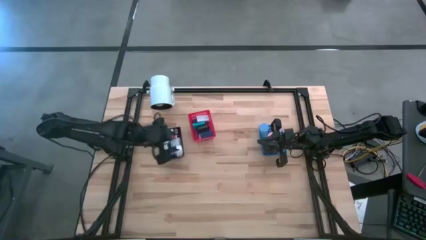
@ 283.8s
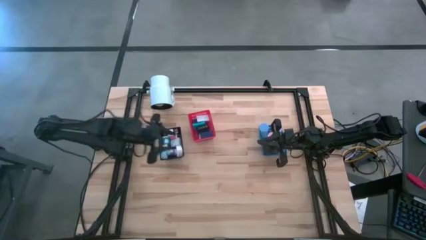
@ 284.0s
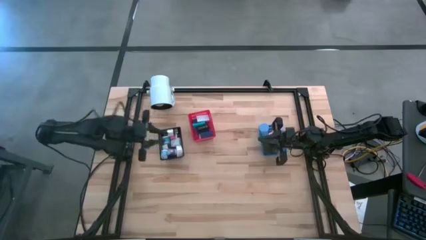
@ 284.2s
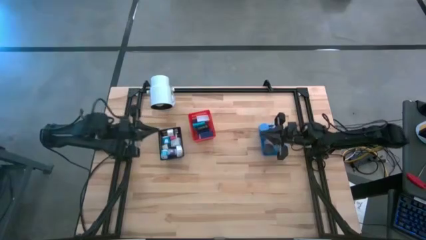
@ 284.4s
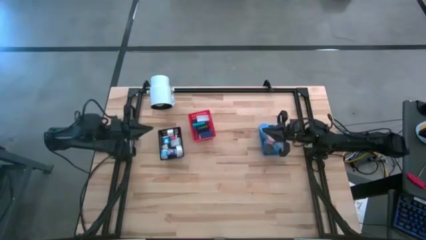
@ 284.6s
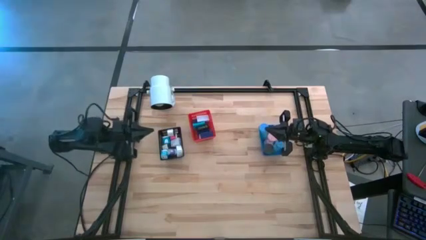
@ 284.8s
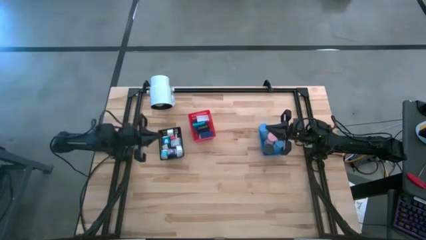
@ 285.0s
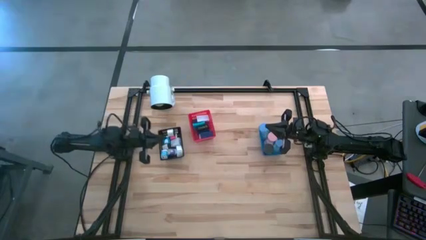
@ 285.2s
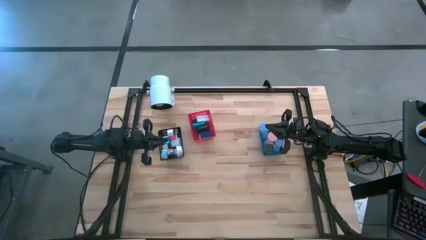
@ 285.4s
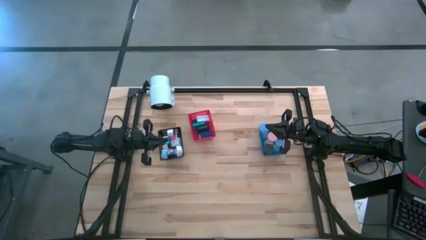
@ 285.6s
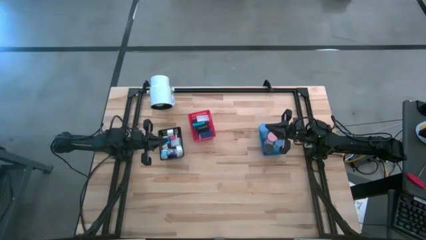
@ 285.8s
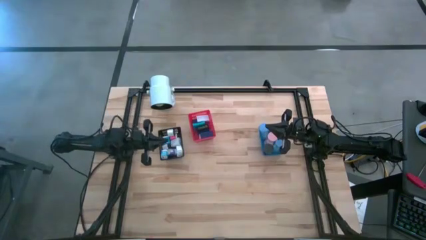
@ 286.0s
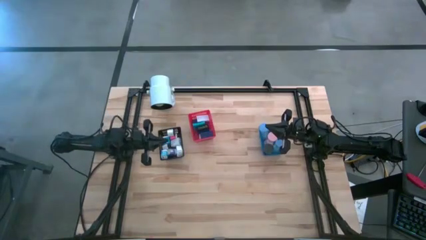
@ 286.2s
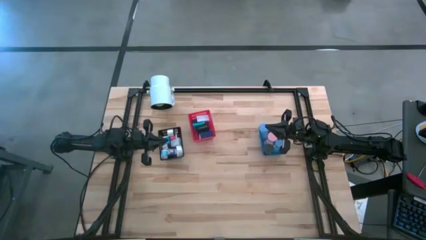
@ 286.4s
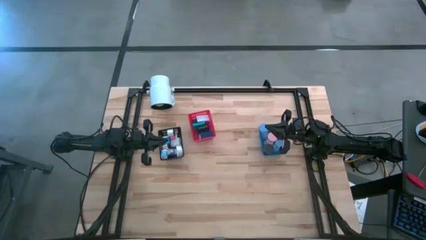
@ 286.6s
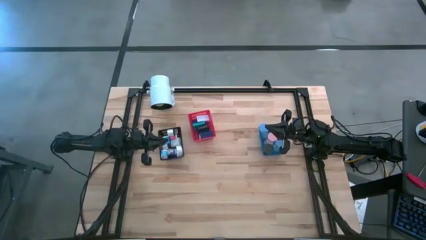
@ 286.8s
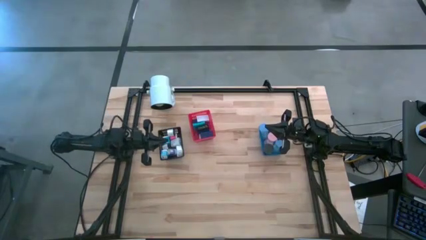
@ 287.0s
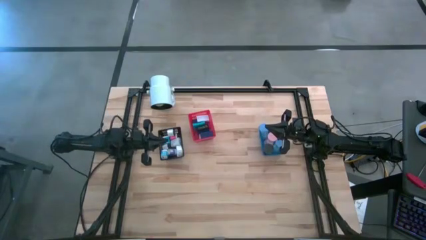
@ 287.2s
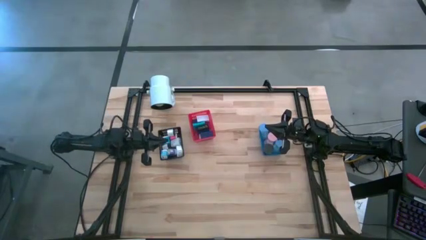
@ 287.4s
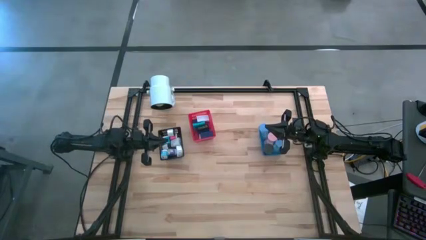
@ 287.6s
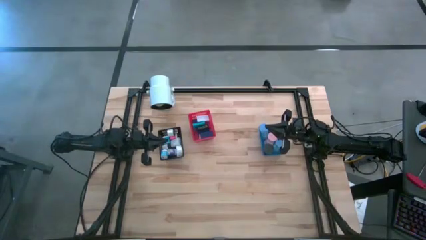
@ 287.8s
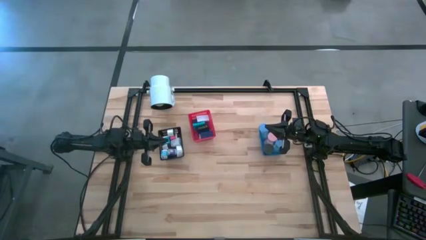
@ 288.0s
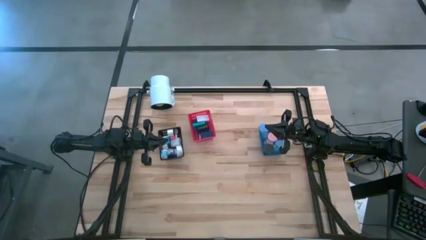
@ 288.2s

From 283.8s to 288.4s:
Task: Pick & Place Office items
Return to Home Position

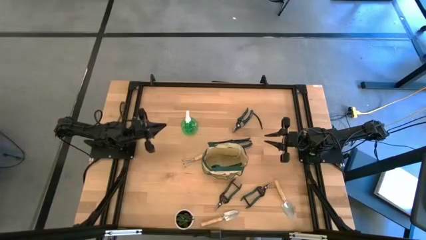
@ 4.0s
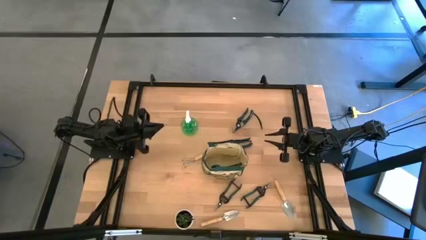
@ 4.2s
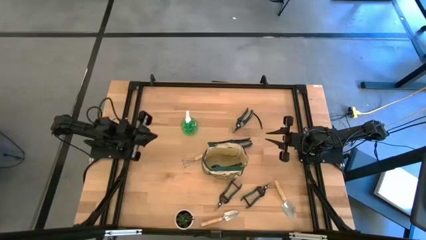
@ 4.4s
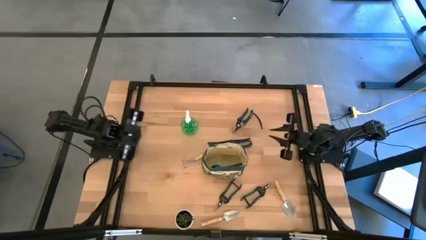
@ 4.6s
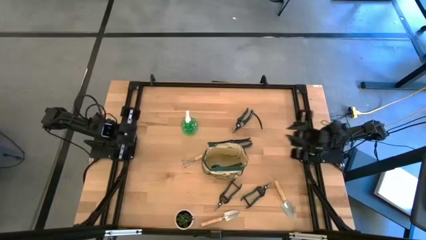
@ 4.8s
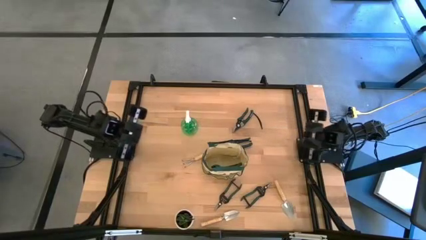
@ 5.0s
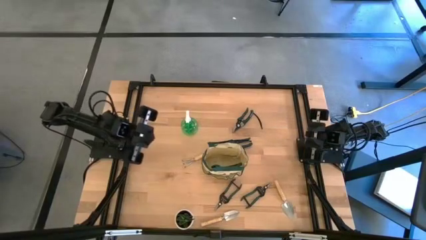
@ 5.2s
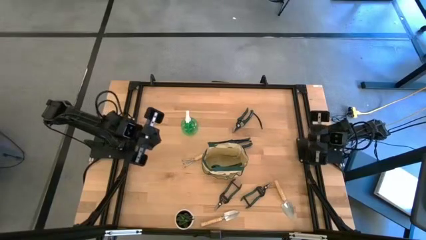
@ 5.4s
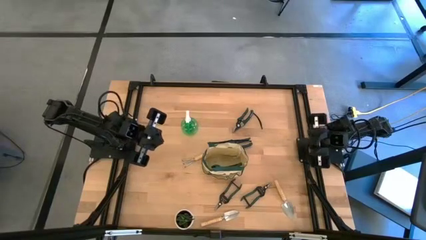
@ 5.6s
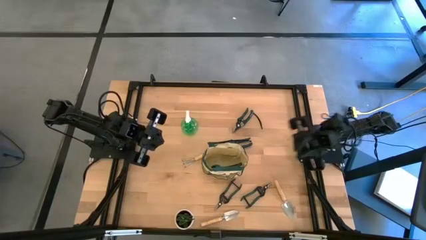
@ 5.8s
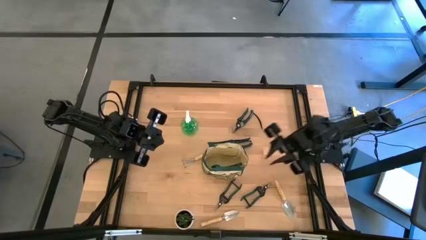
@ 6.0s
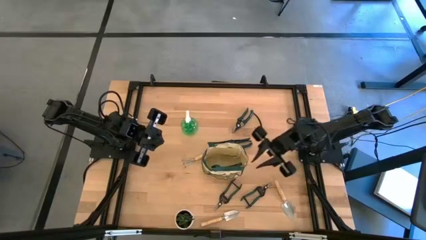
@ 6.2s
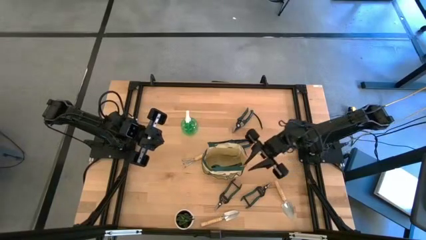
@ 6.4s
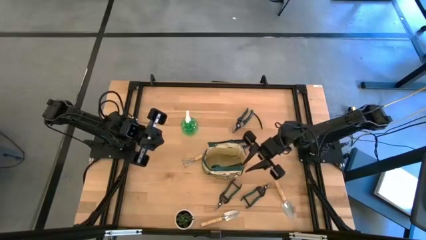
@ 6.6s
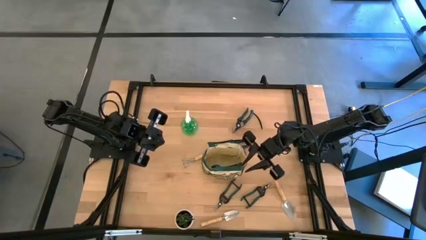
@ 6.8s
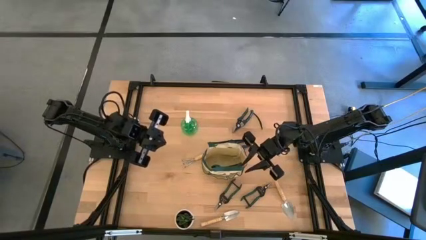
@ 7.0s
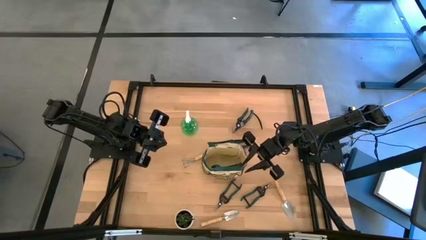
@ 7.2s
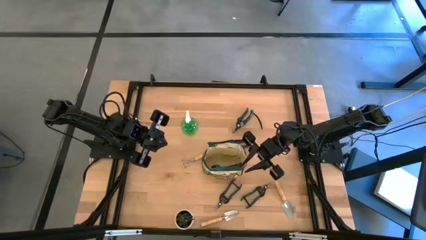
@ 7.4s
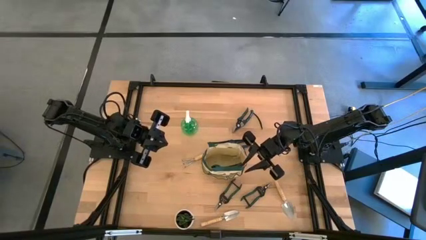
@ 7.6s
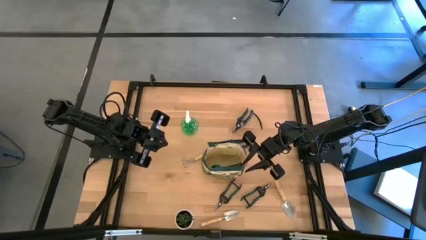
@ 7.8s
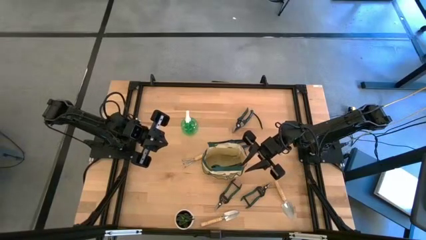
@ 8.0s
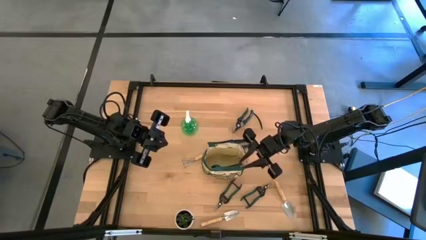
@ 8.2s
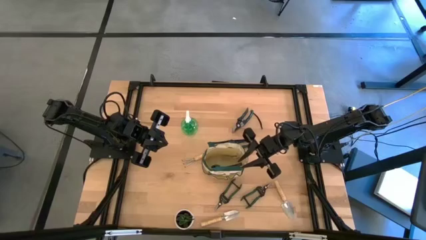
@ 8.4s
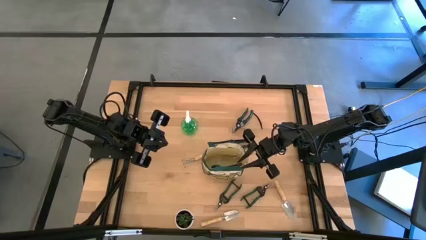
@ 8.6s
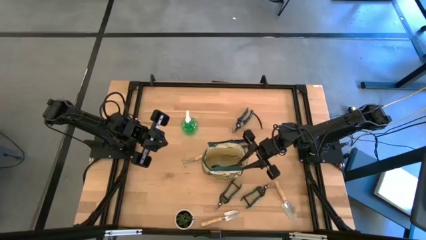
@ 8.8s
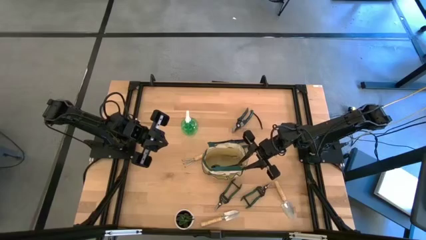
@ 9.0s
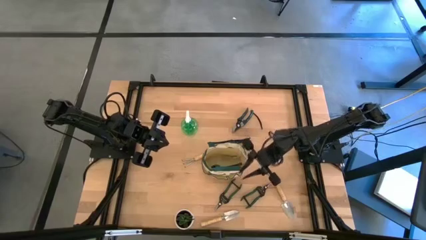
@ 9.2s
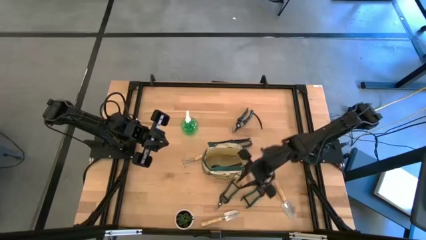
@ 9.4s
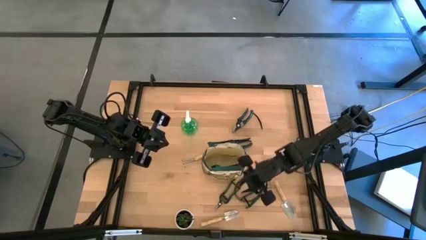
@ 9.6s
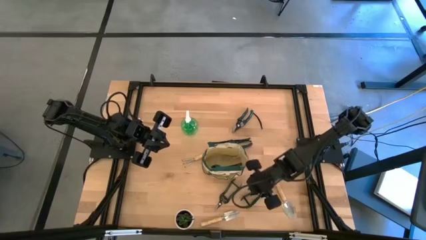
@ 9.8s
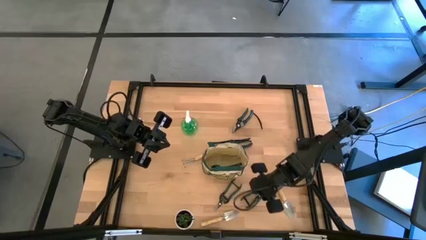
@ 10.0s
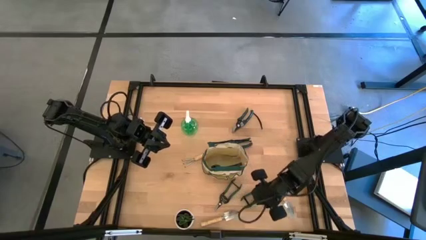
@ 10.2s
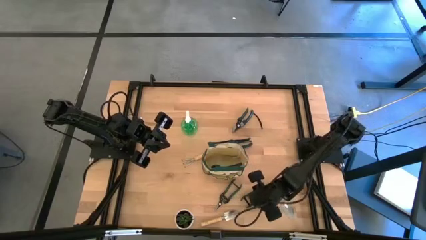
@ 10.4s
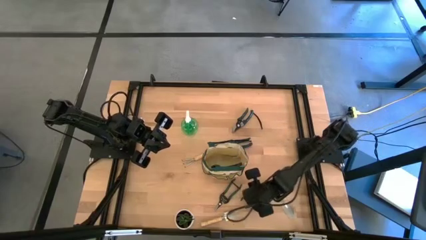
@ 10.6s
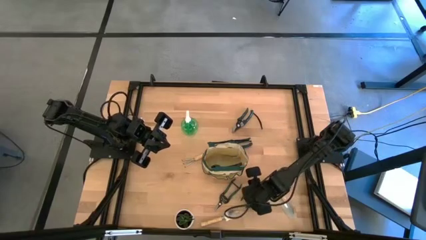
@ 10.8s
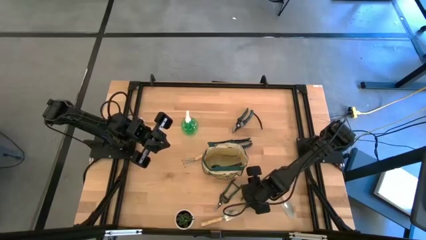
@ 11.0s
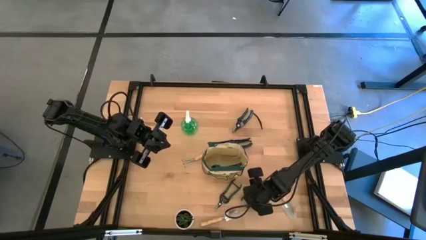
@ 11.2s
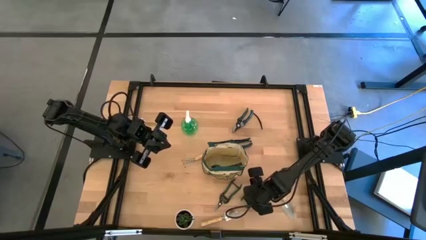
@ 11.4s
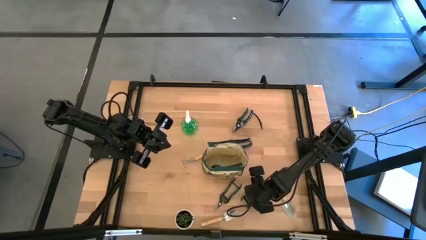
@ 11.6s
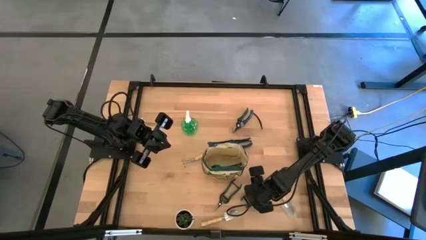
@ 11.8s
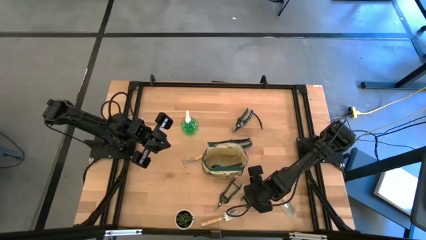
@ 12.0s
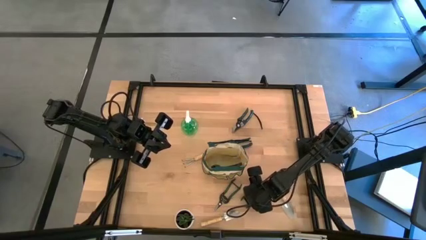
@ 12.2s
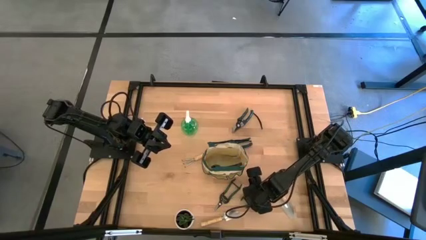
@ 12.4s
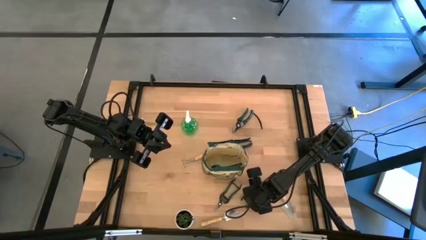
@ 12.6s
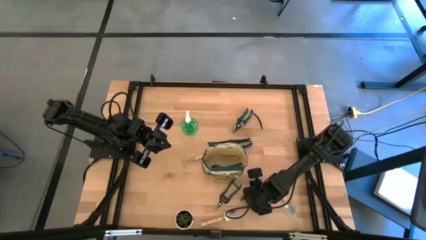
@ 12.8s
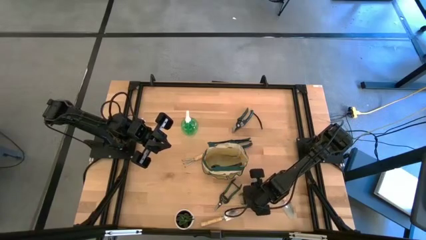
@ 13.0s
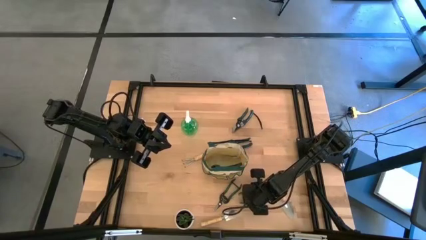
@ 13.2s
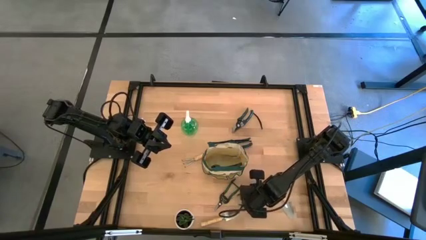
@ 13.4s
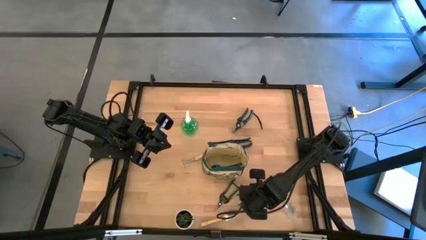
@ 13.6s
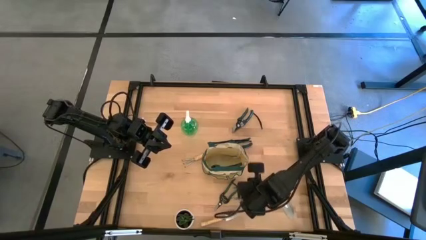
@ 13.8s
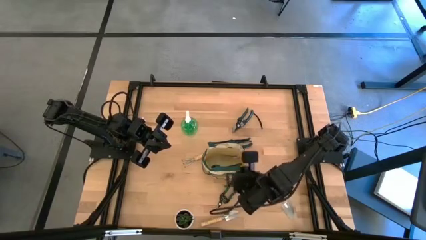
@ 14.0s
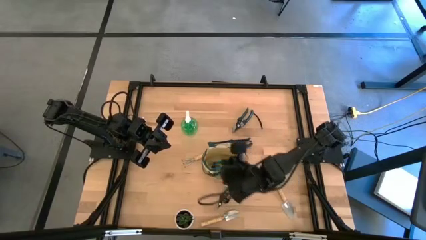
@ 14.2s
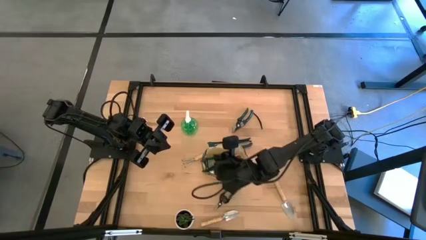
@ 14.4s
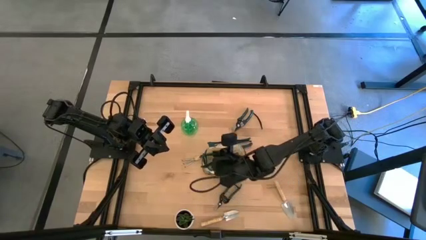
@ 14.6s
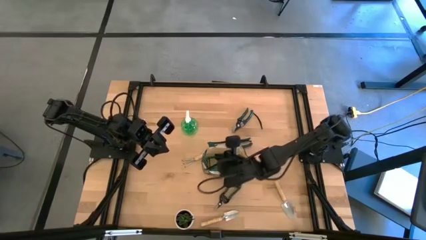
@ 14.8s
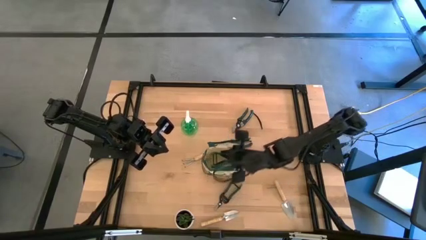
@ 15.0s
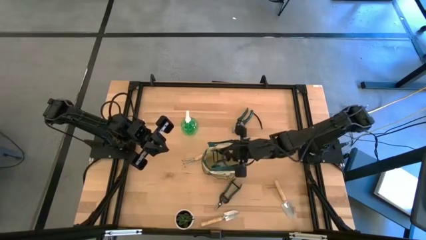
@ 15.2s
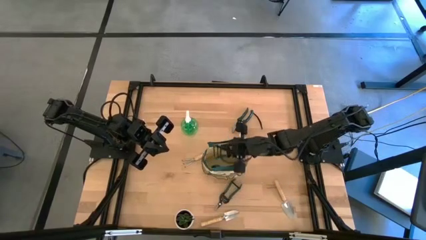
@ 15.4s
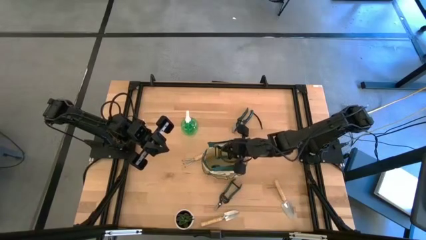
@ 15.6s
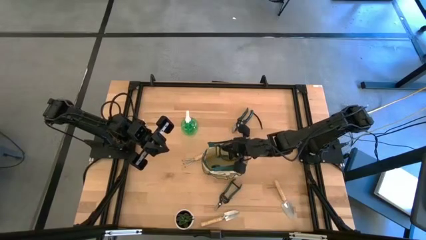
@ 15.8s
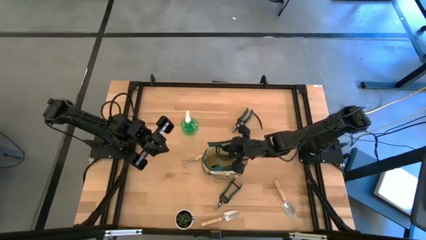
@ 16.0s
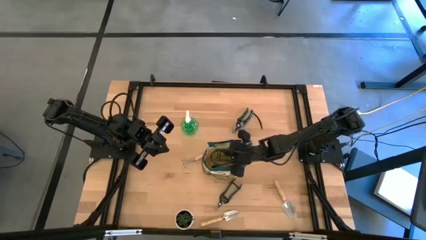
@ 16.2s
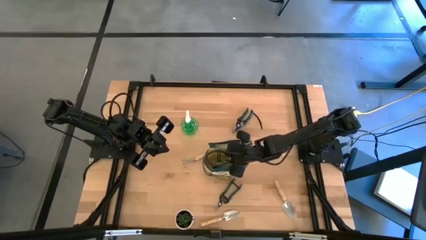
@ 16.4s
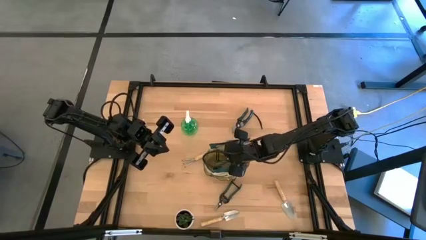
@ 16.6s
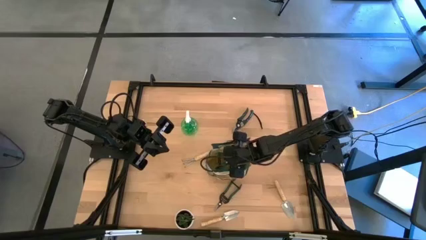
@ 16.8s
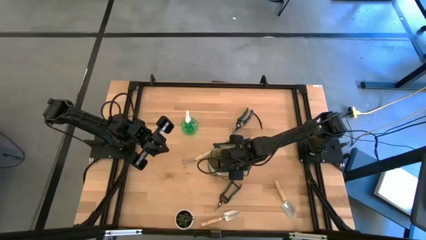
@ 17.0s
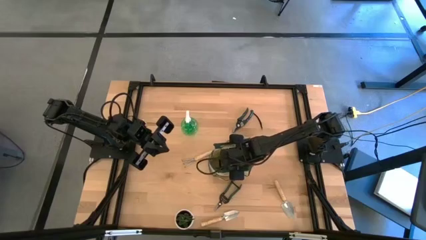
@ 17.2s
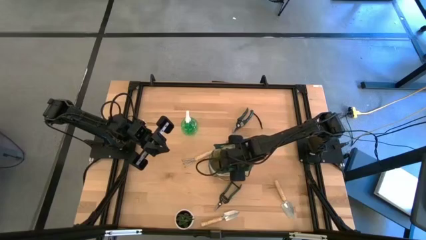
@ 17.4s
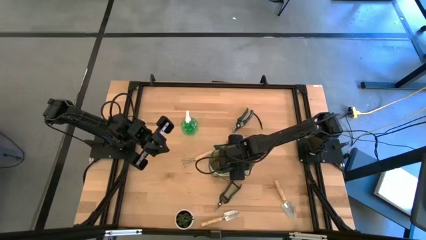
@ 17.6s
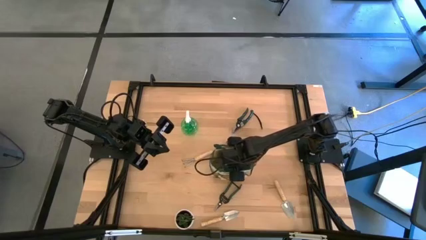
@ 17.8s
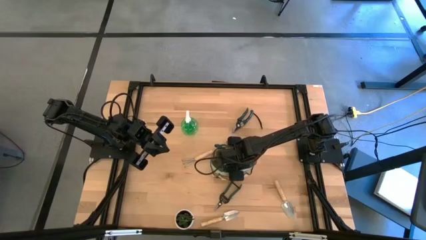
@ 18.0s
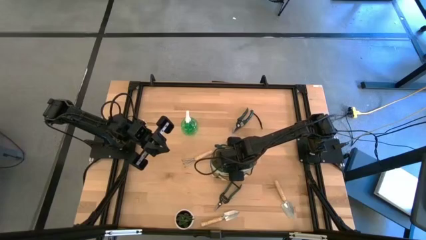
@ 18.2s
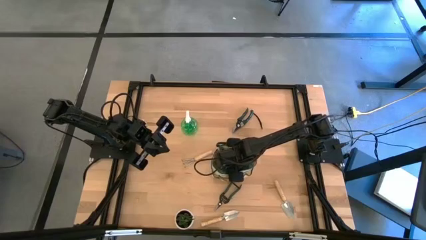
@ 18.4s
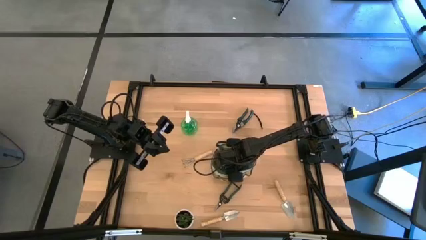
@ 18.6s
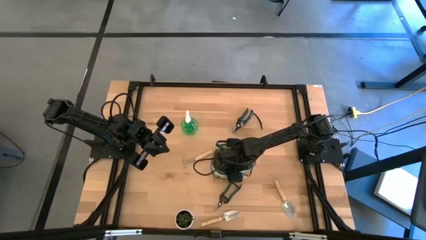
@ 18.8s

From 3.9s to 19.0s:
Task: Pick & Place Garden tools in Gardening bag
Put the right green pruning shears into the green gardening bag
